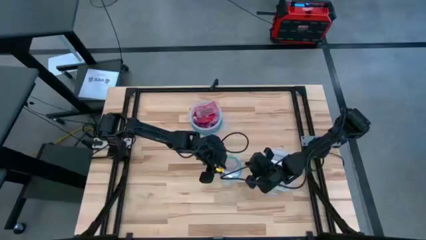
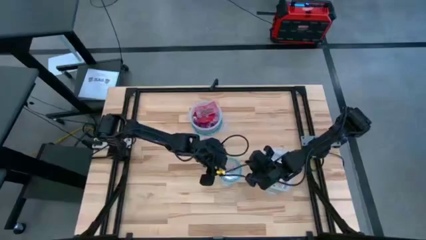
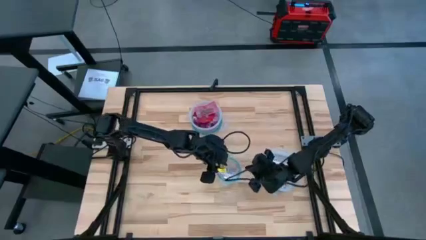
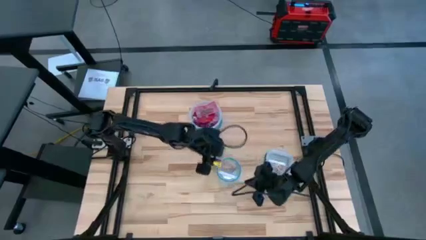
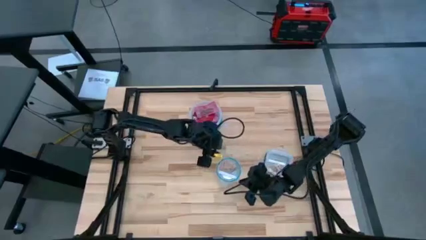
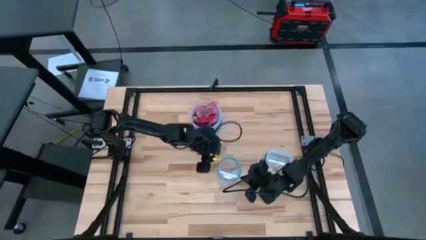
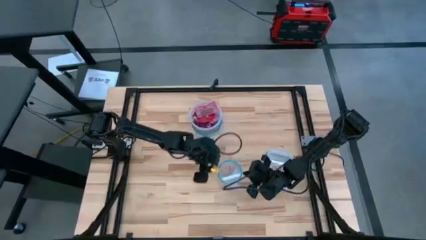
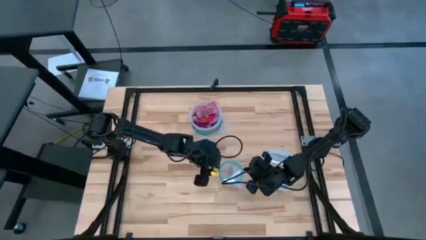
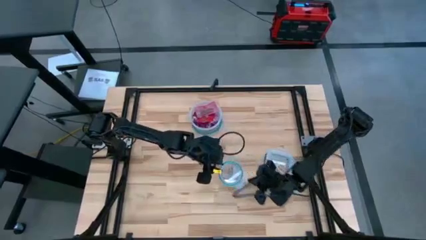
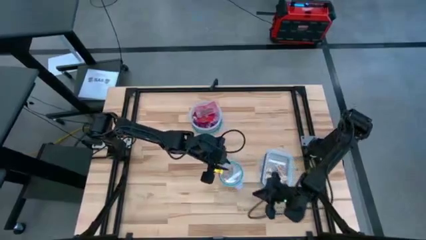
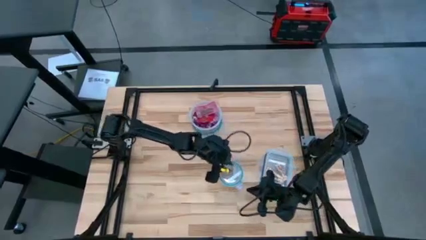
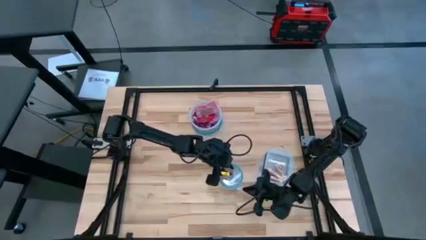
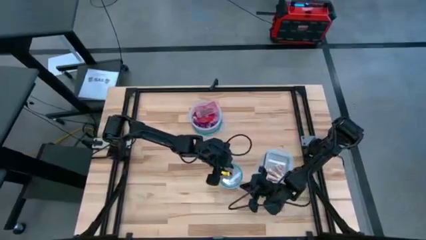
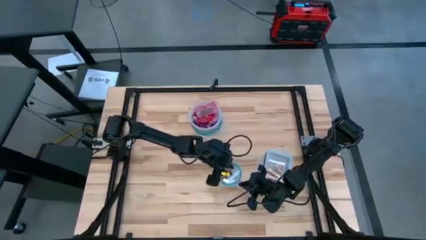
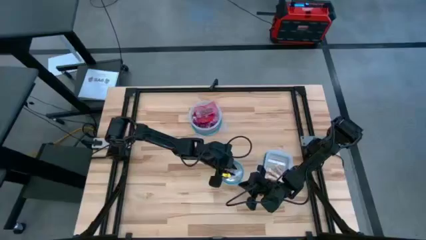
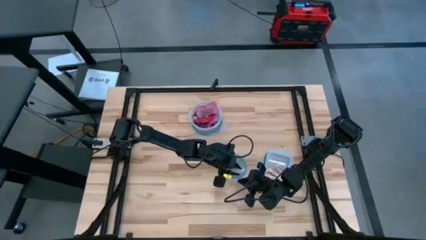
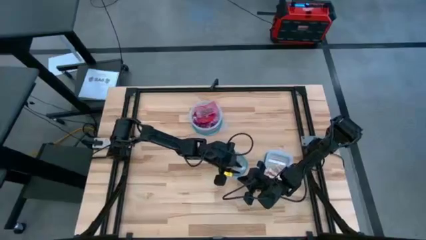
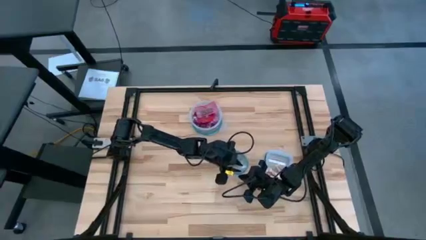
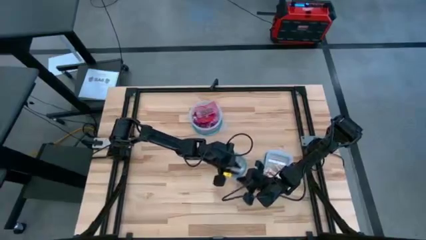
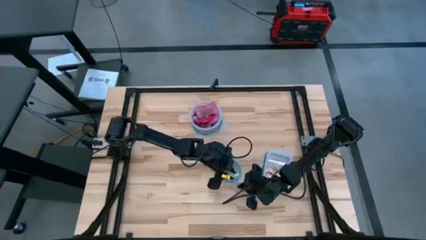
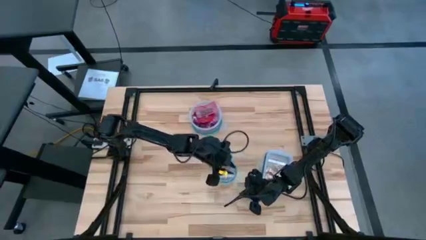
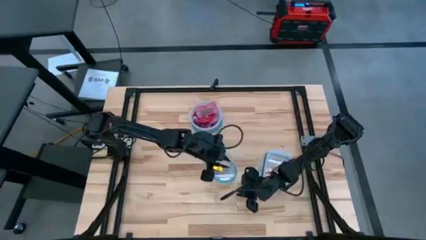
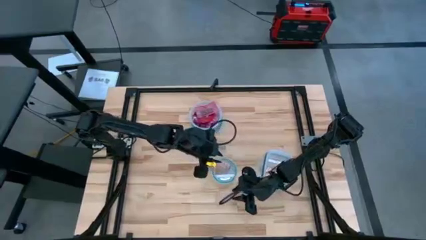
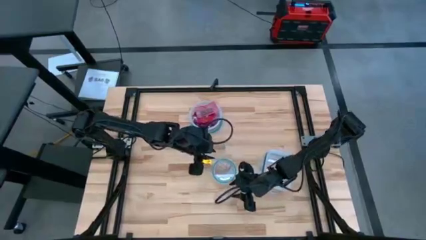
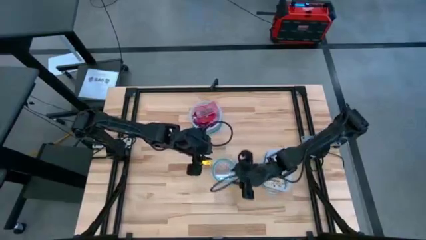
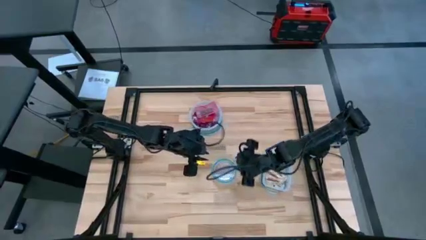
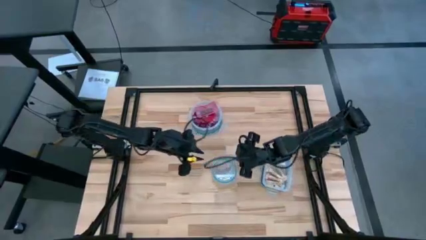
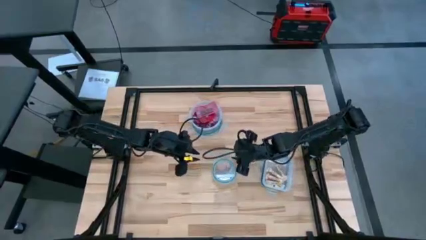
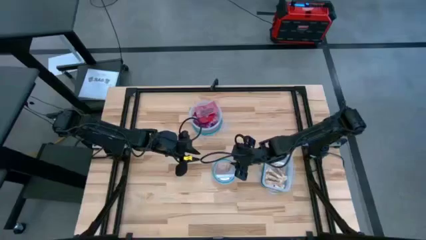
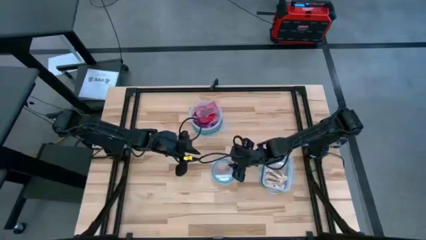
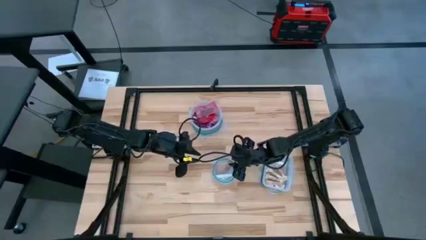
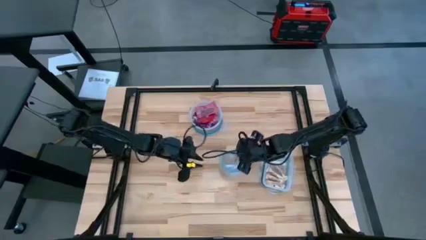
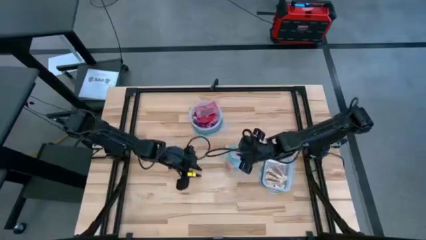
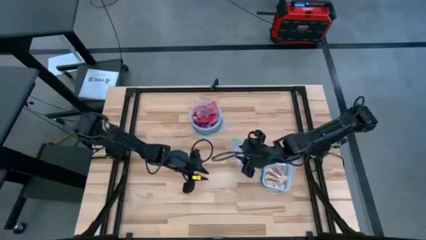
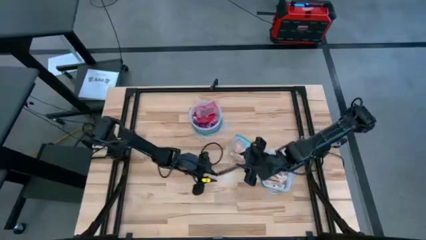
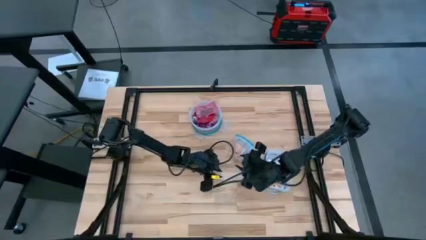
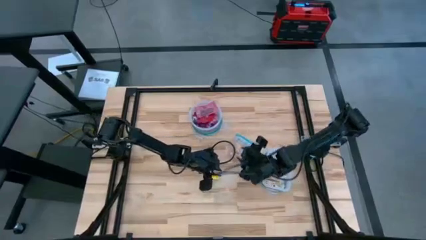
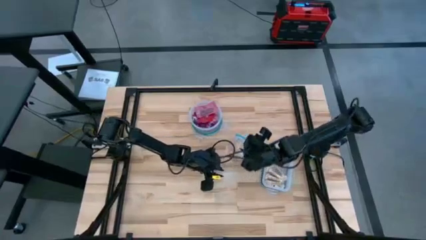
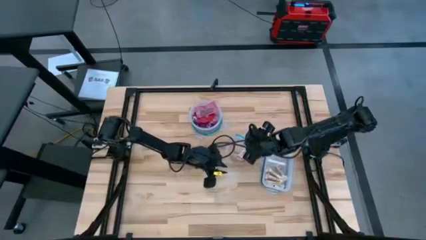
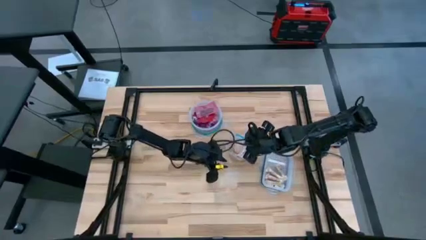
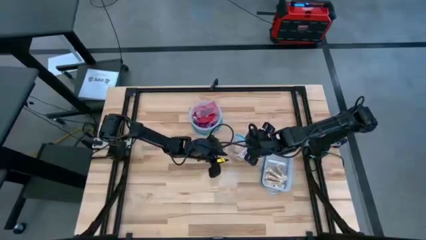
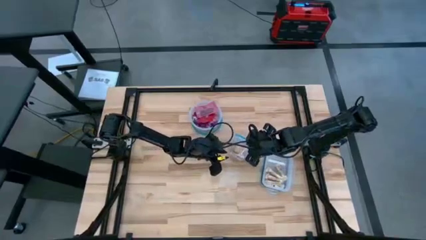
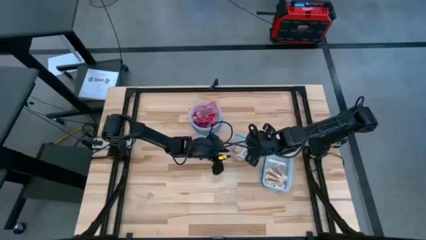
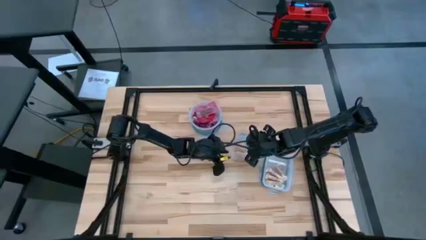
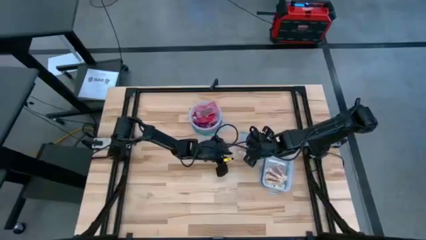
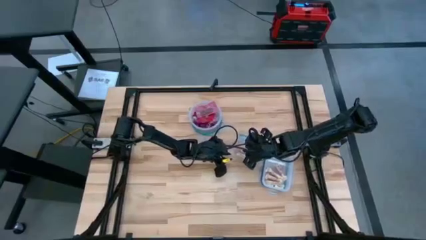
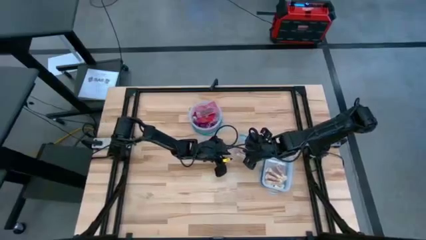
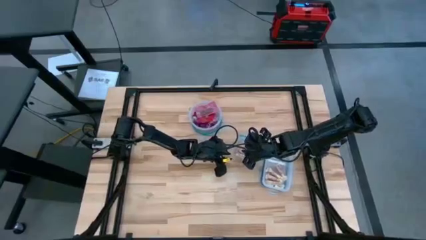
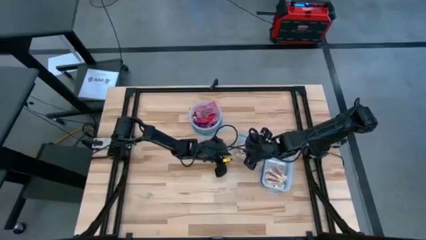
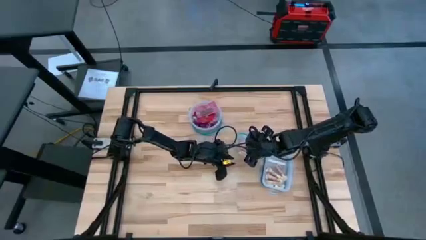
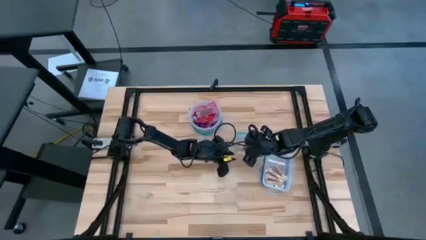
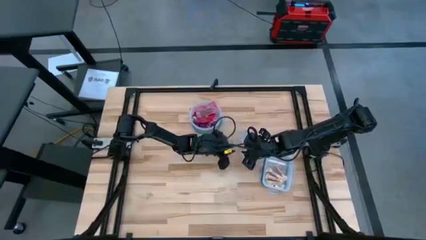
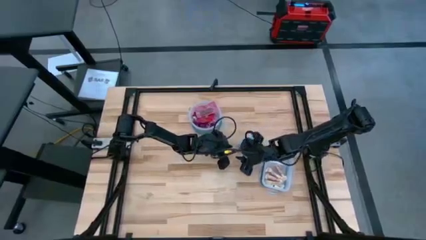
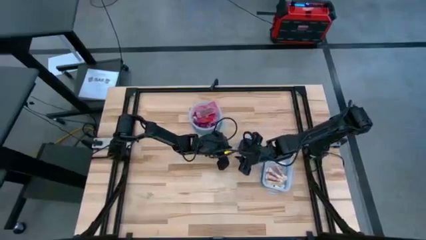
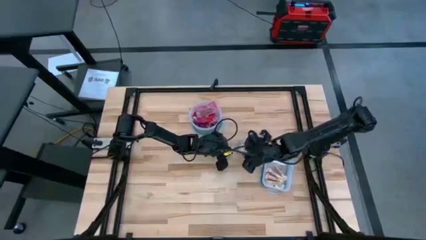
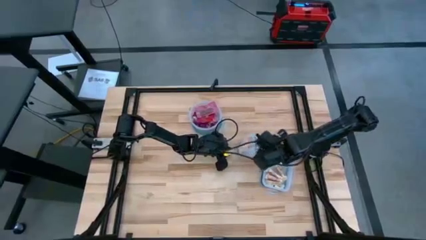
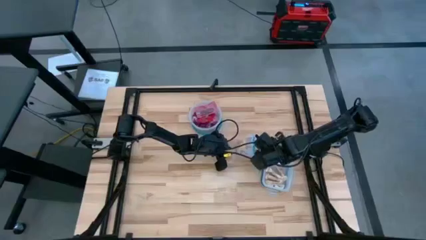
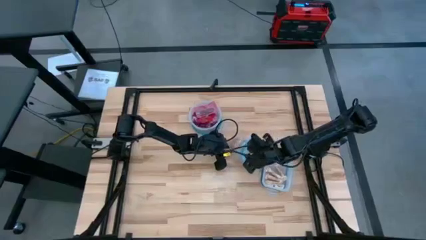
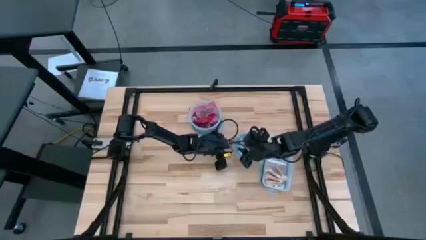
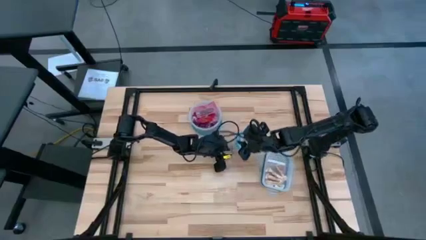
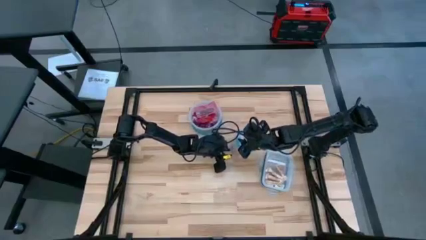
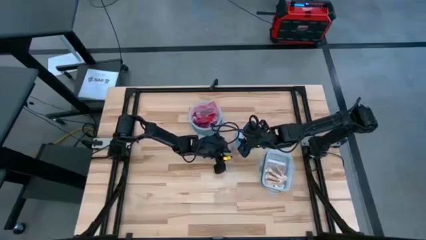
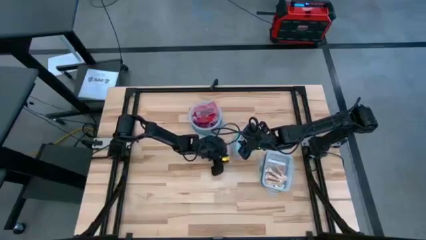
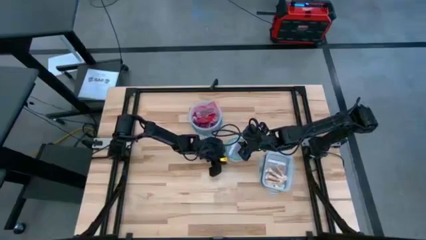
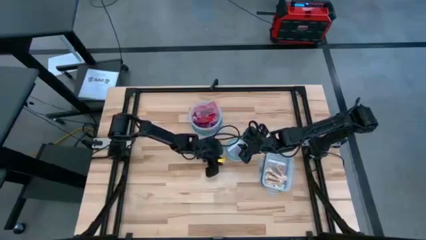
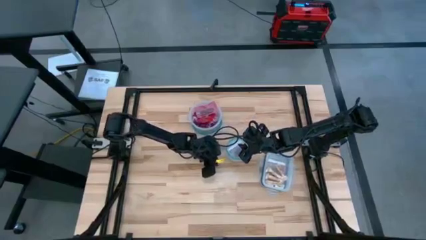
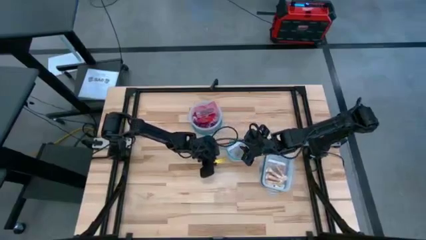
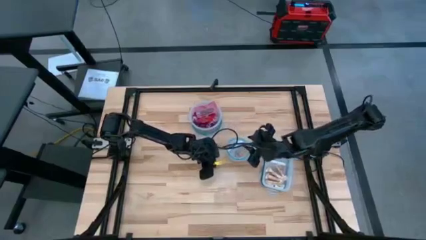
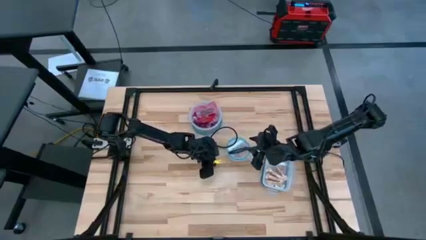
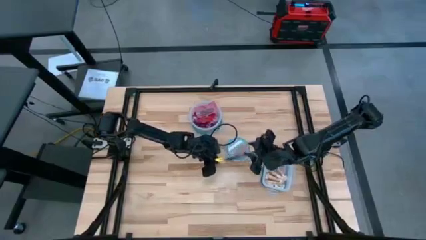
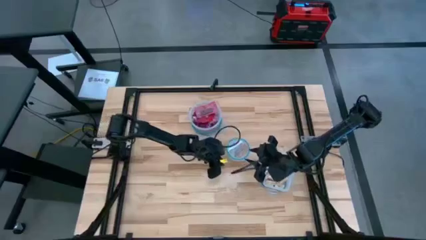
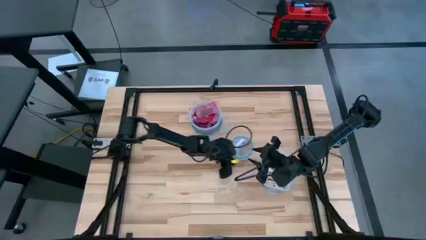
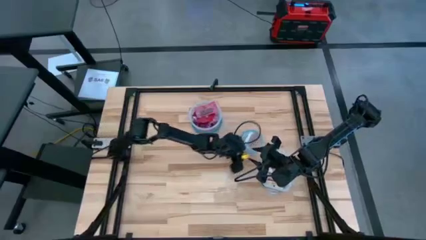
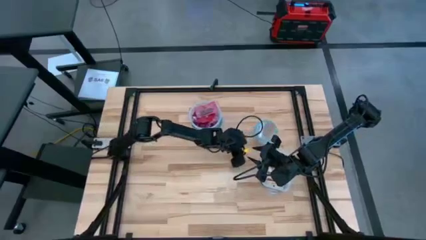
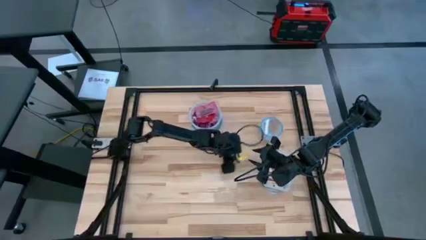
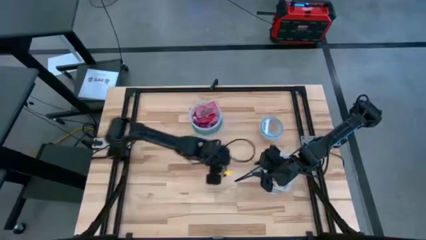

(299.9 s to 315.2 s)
Task: Sort candy
Close the small circular transparent bin
